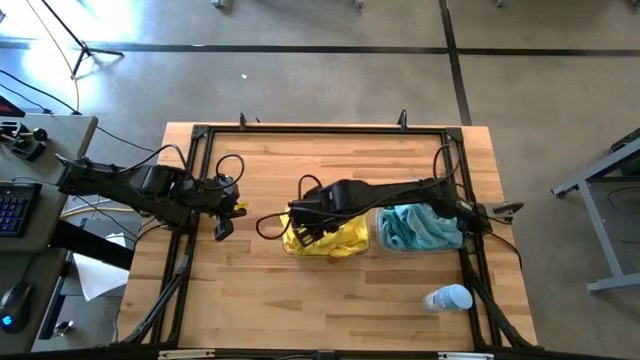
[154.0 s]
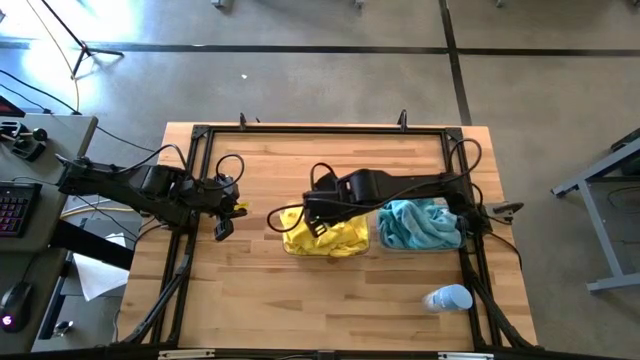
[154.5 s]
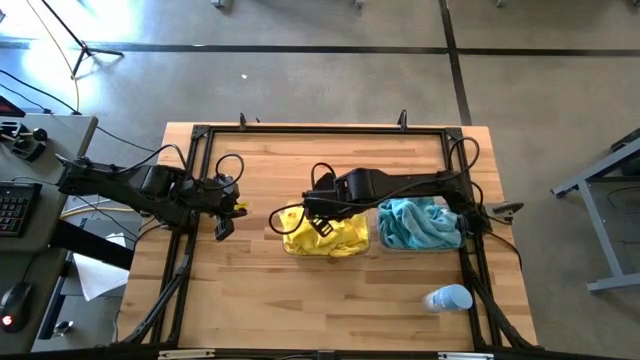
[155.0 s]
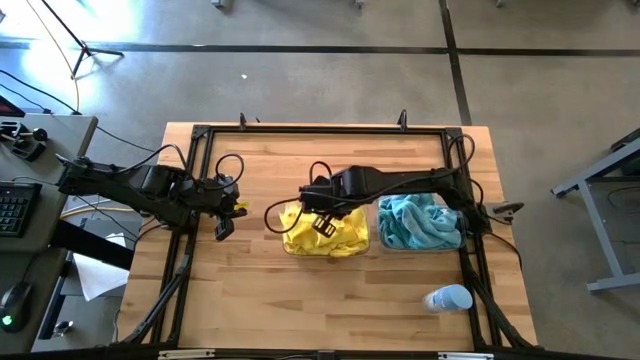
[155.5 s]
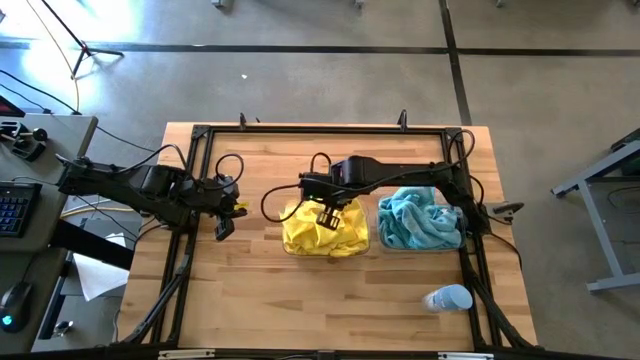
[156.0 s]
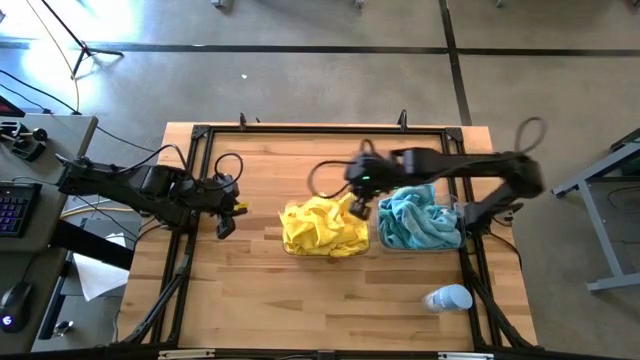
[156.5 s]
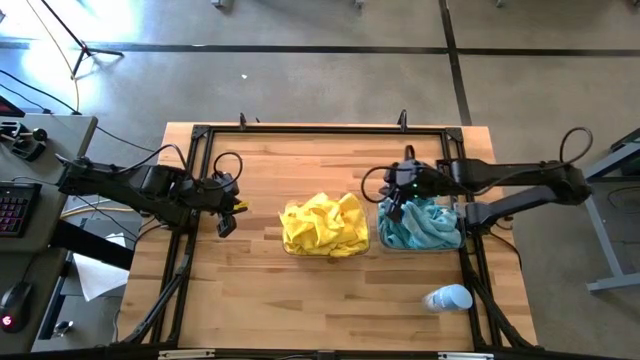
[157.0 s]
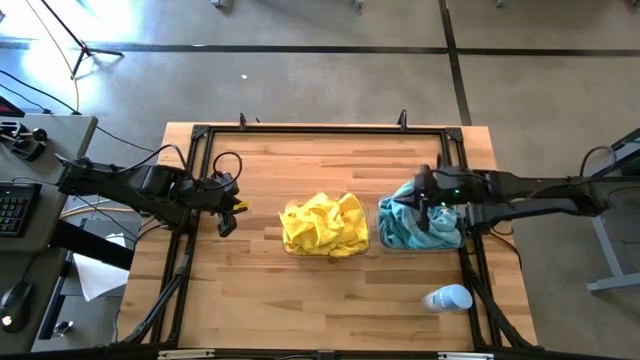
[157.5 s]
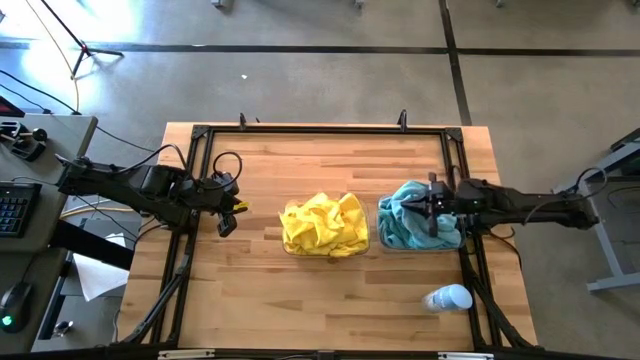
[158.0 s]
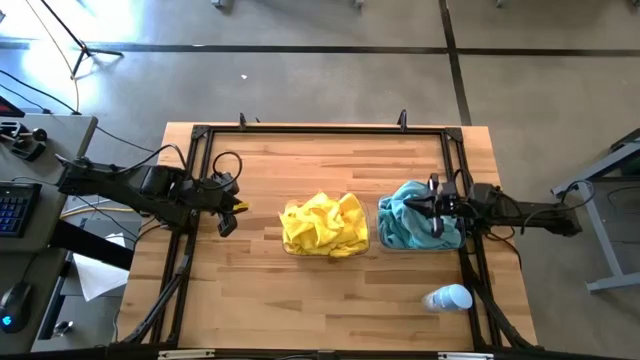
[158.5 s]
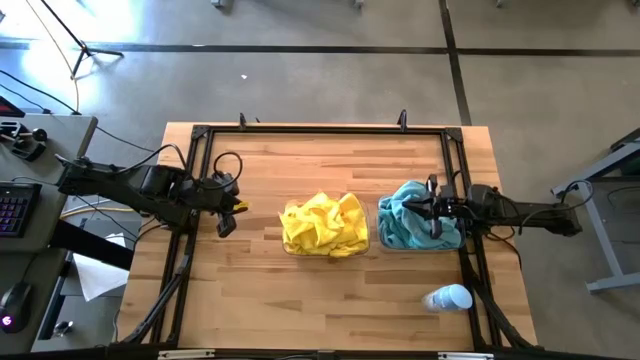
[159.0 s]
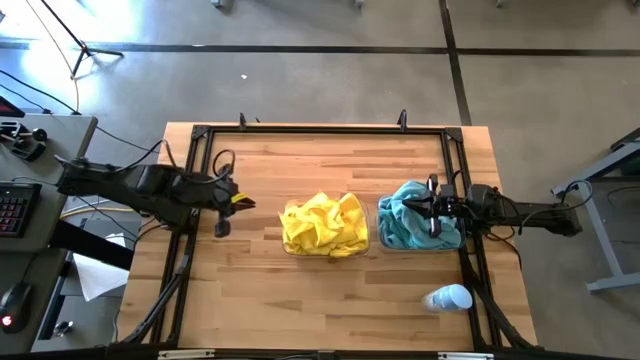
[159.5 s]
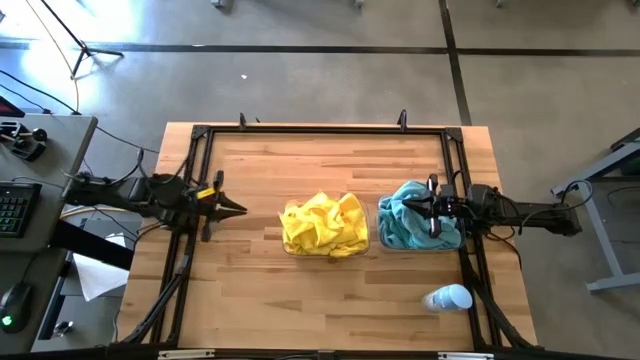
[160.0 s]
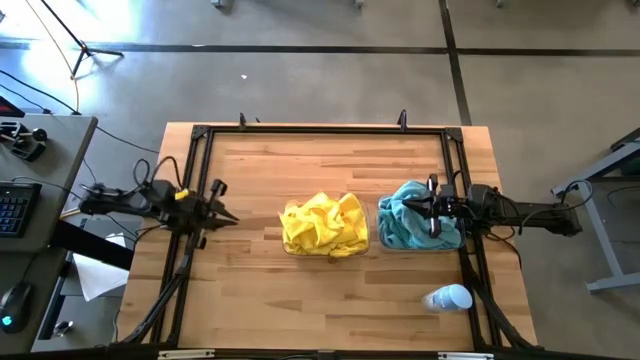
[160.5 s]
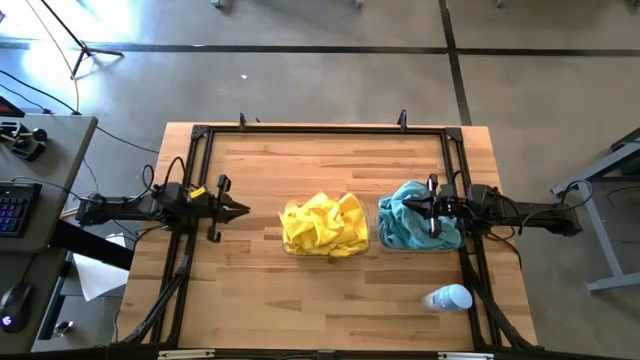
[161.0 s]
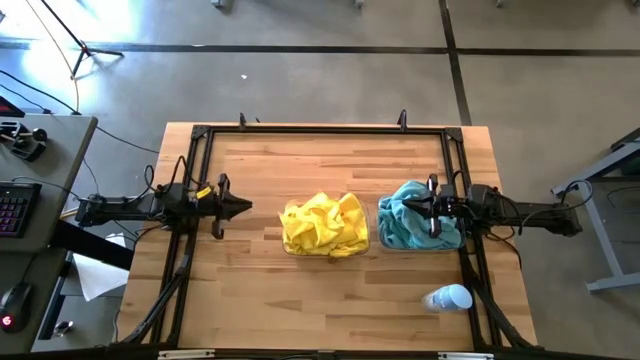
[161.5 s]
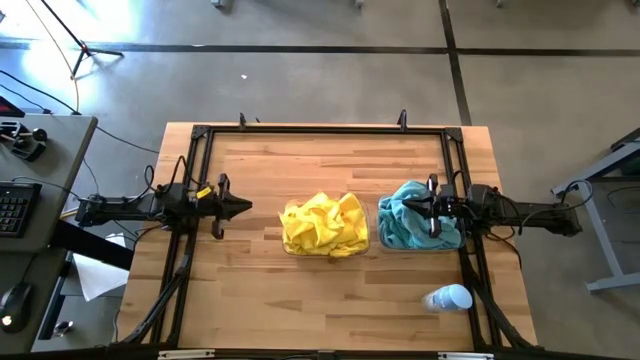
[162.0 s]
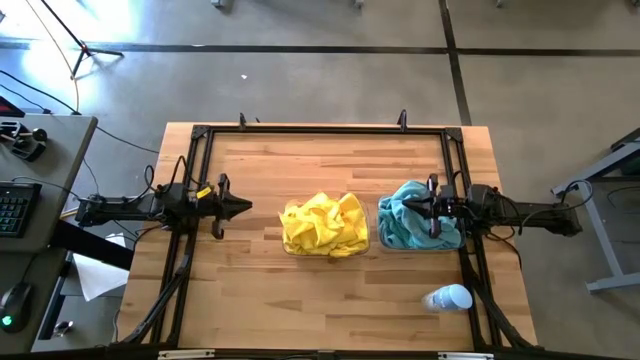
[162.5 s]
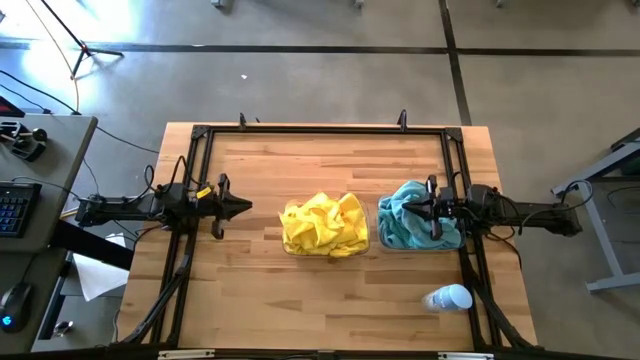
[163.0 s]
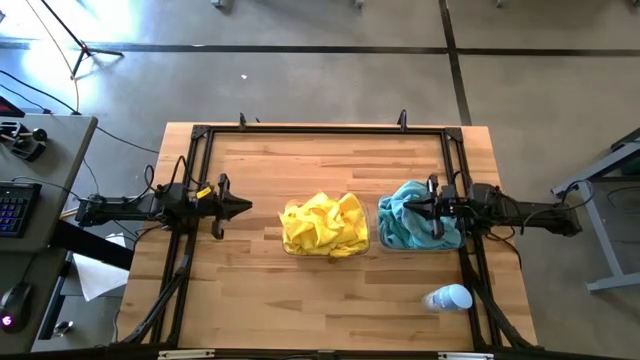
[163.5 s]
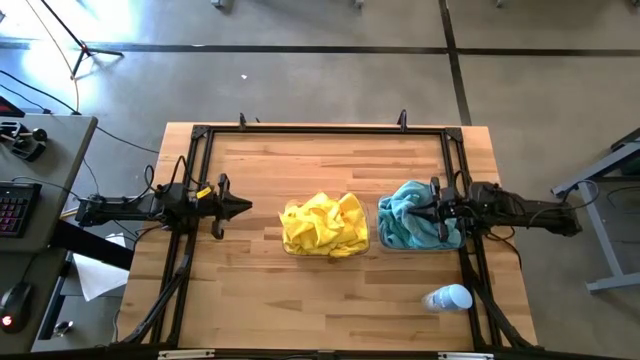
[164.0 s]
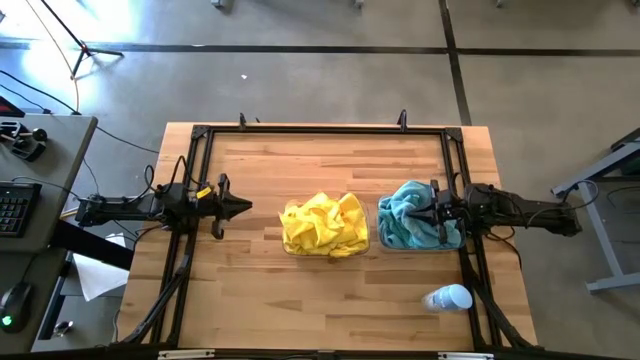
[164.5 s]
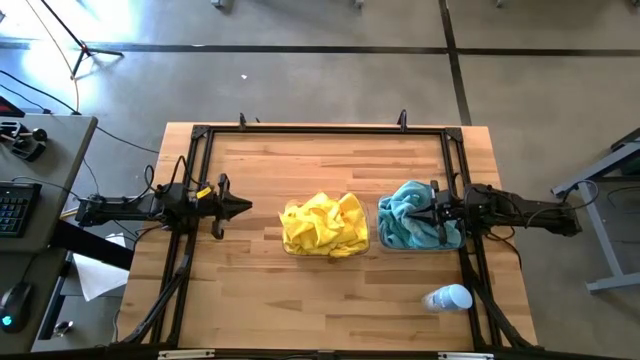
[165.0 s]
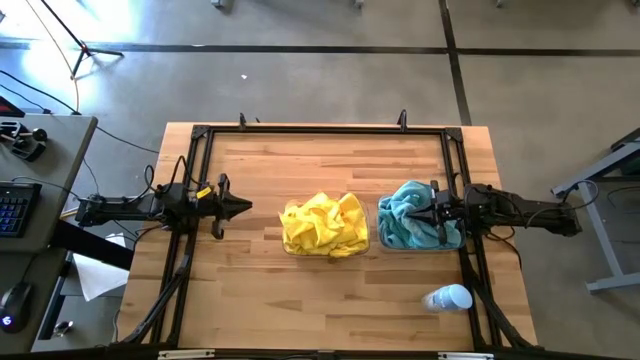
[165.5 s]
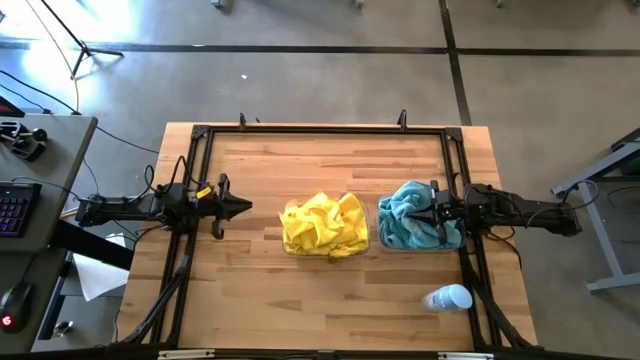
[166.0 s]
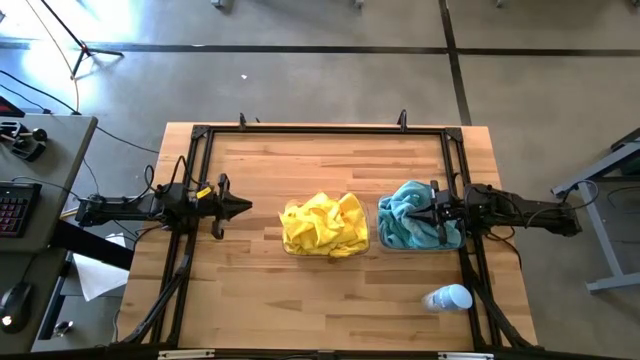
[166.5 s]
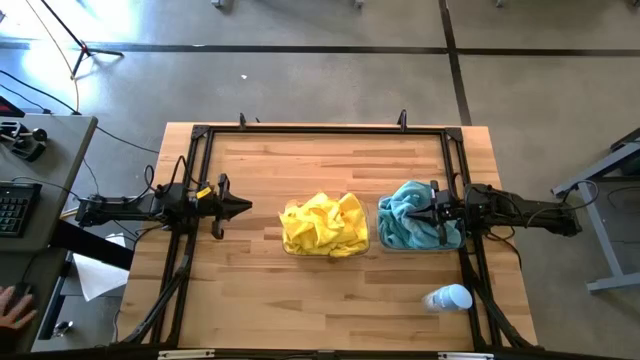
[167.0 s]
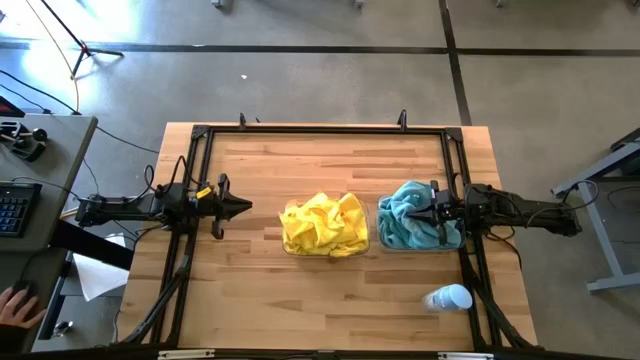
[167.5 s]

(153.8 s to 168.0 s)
Task: Sort microfiber towel by color & place in baskets
Return to Home Position

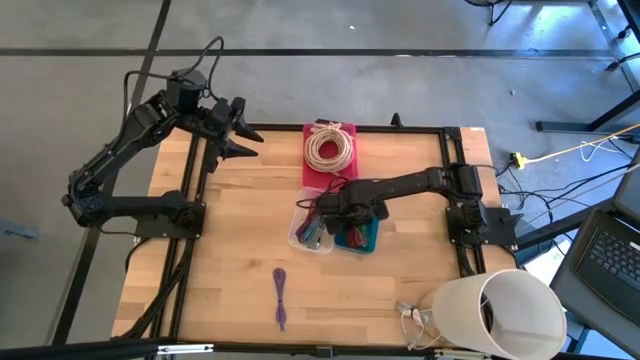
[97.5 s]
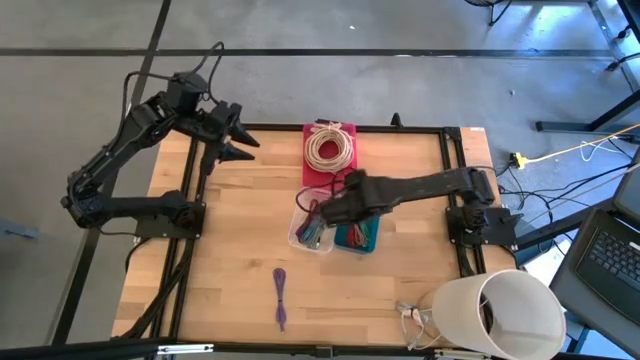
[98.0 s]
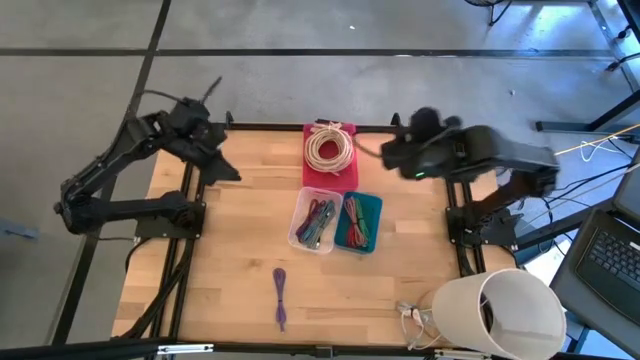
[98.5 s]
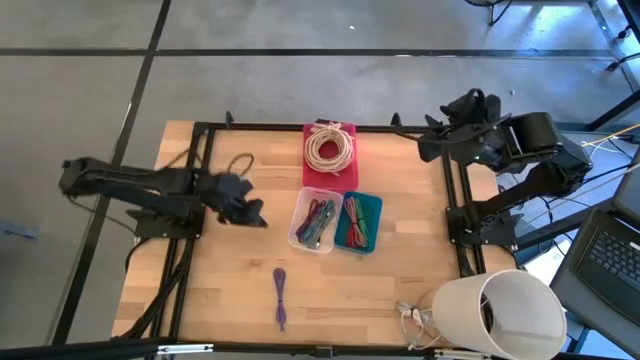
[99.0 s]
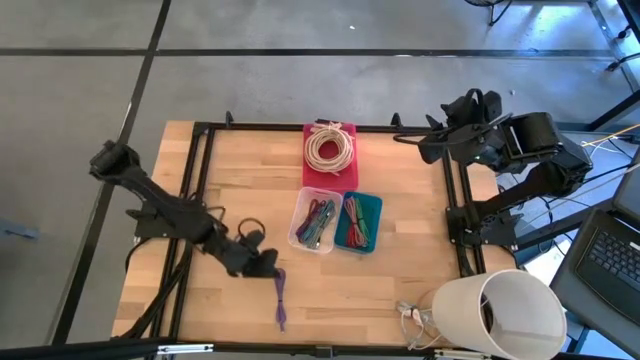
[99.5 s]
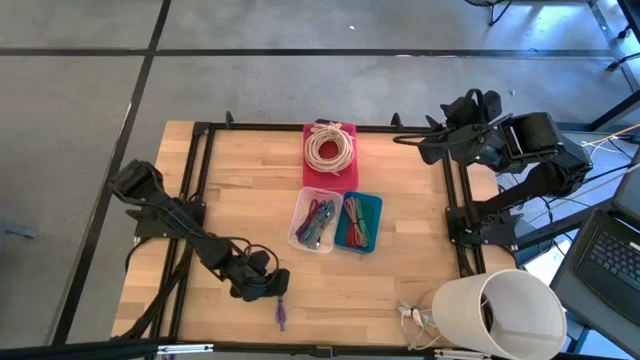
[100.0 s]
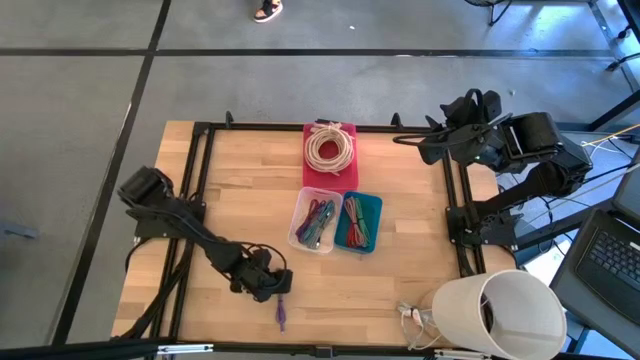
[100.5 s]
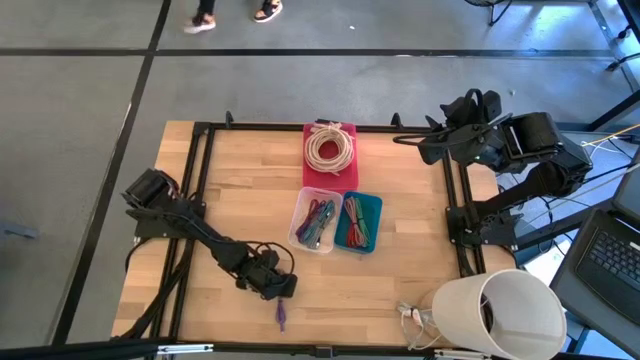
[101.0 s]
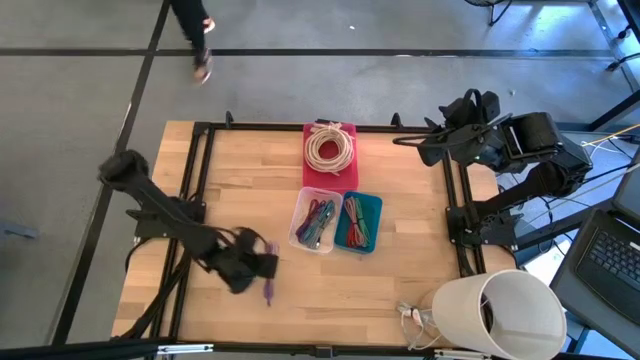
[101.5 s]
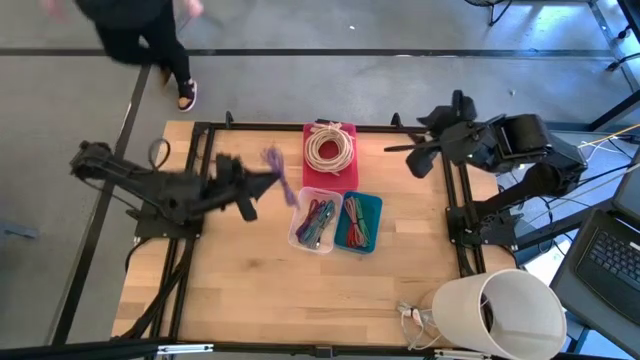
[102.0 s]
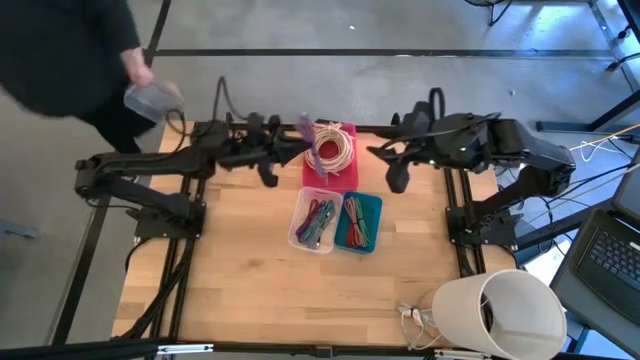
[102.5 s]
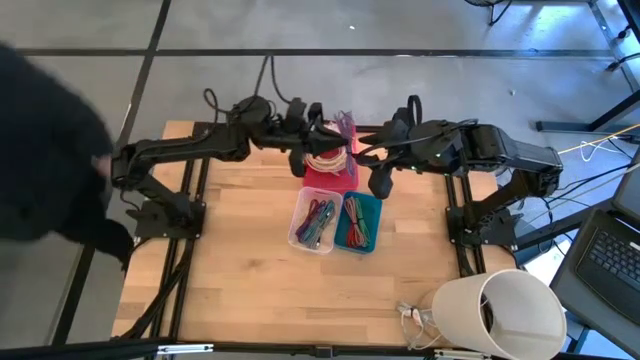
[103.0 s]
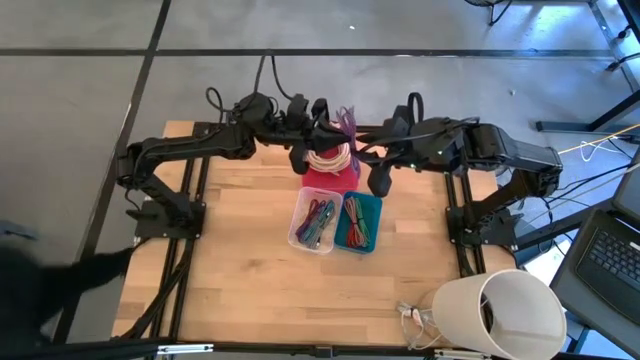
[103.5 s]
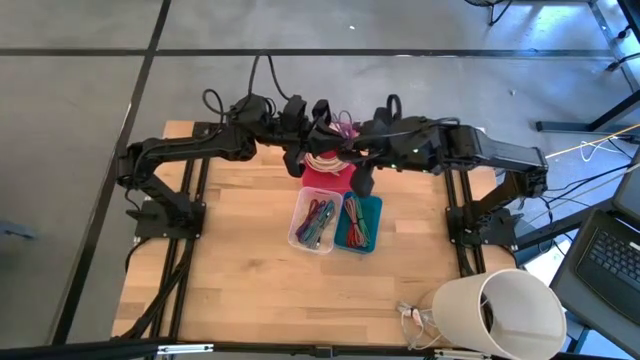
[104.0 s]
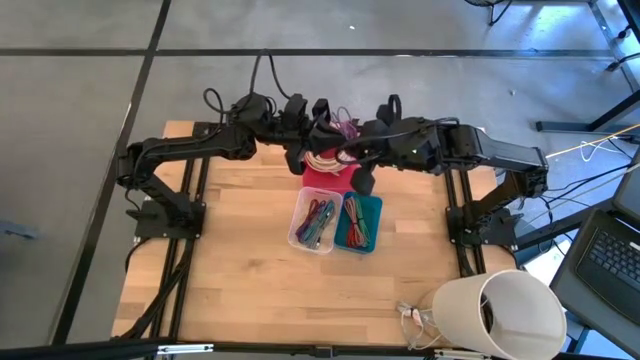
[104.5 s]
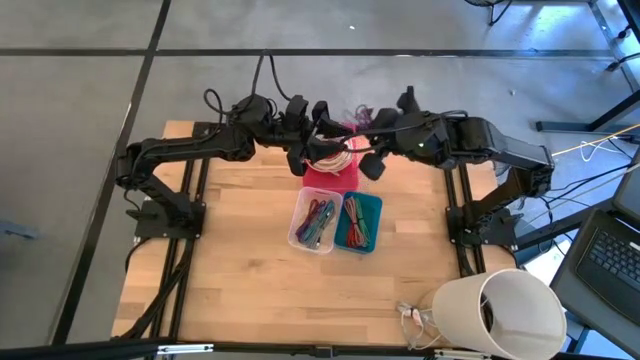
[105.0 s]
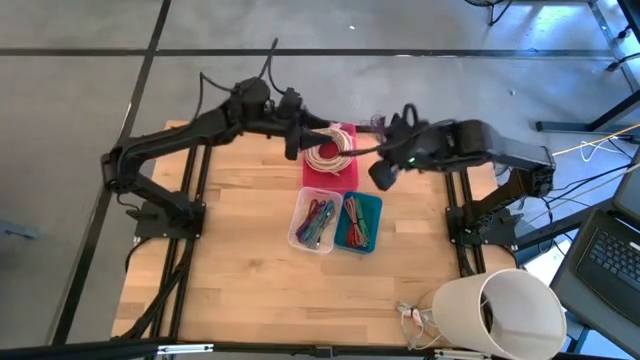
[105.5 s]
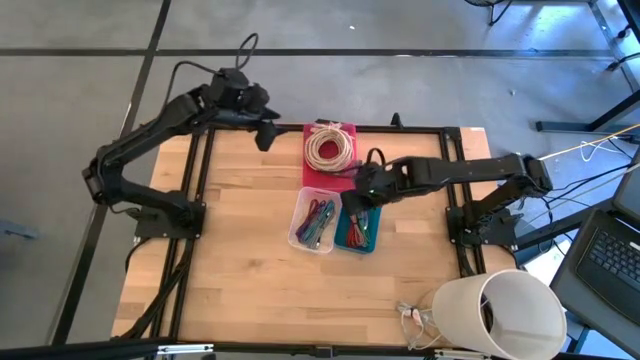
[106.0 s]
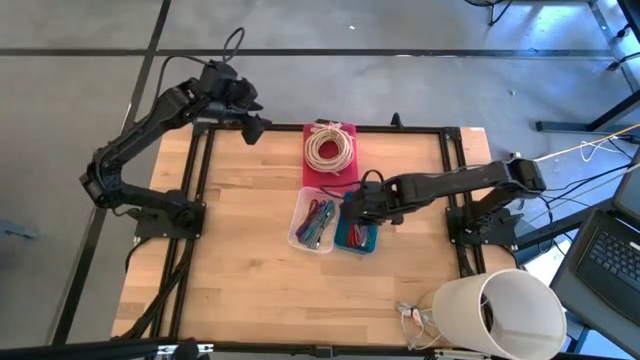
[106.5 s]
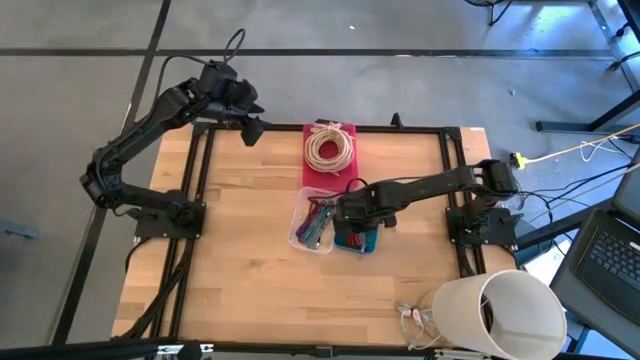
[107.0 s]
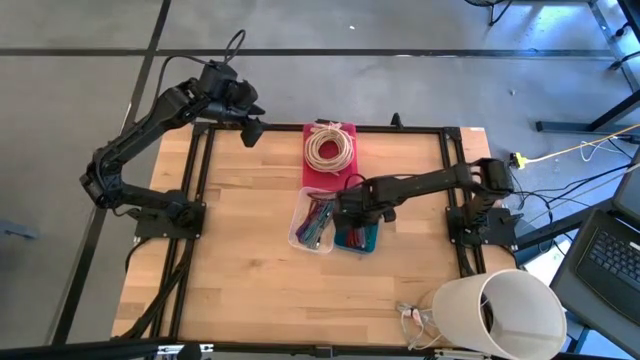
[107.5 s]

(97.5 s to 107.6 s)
Task: Pick & Place USB Port
Put the violet charger cable into the blue bin
